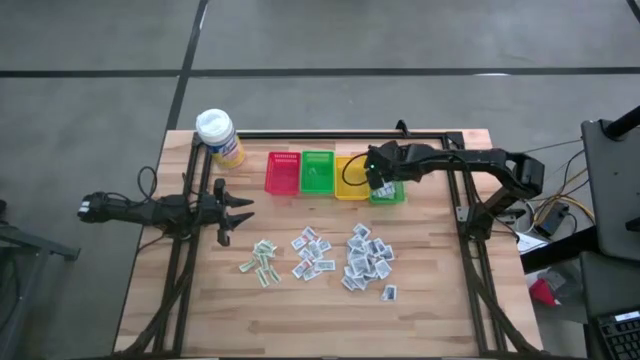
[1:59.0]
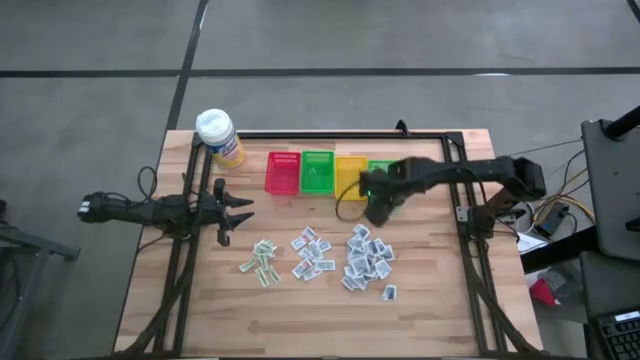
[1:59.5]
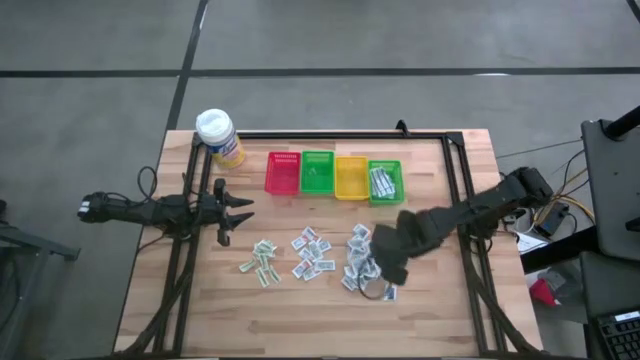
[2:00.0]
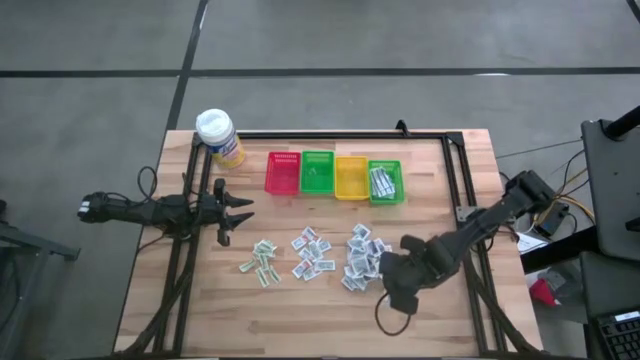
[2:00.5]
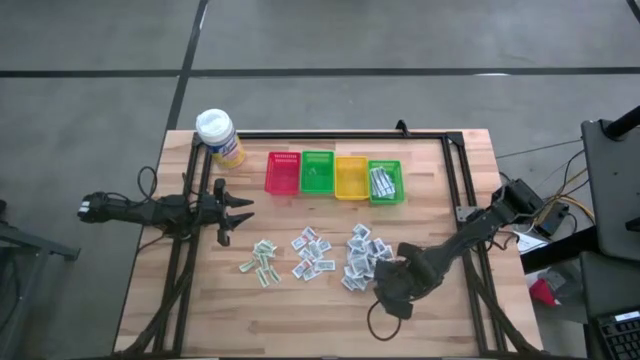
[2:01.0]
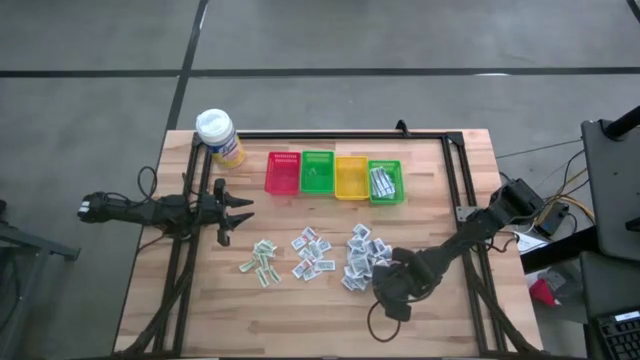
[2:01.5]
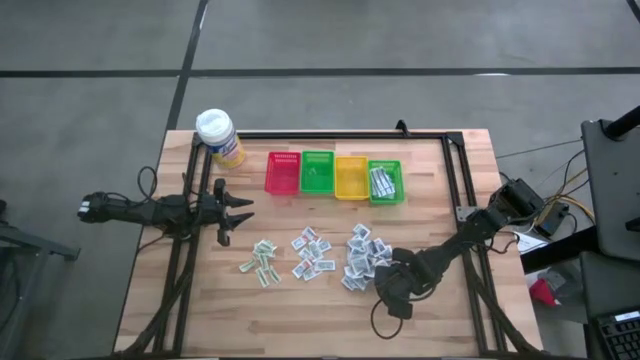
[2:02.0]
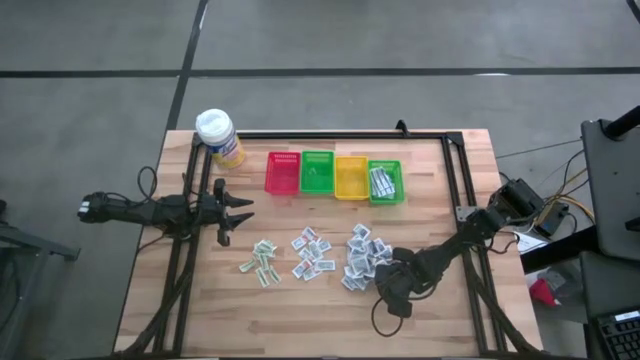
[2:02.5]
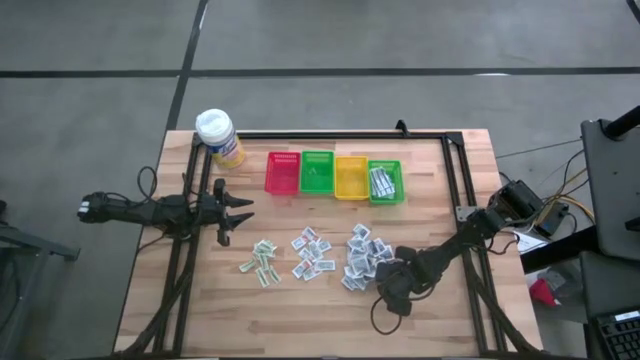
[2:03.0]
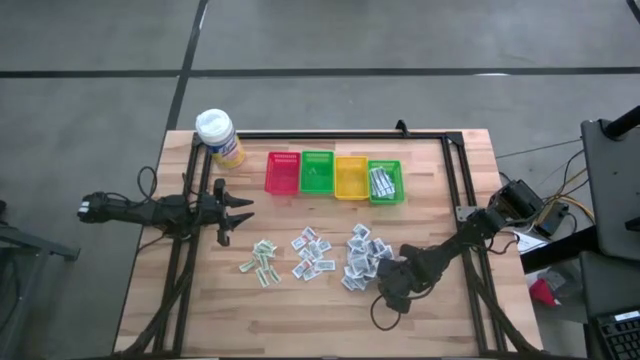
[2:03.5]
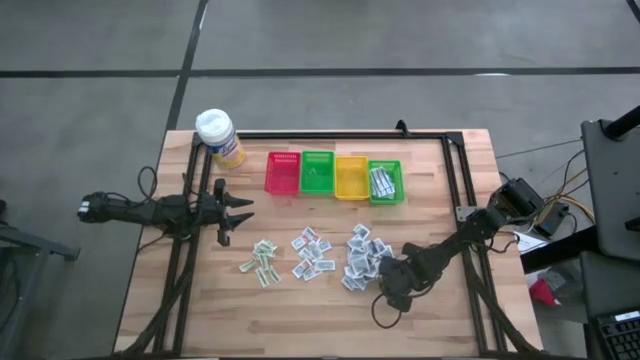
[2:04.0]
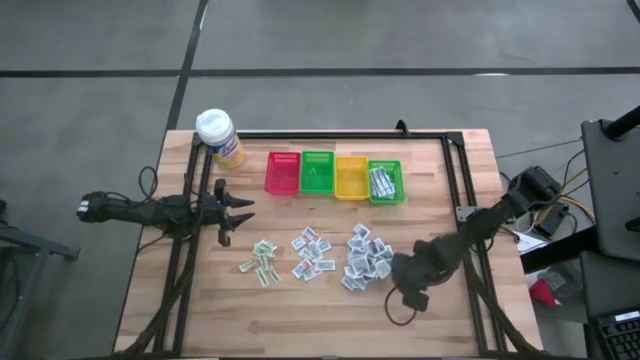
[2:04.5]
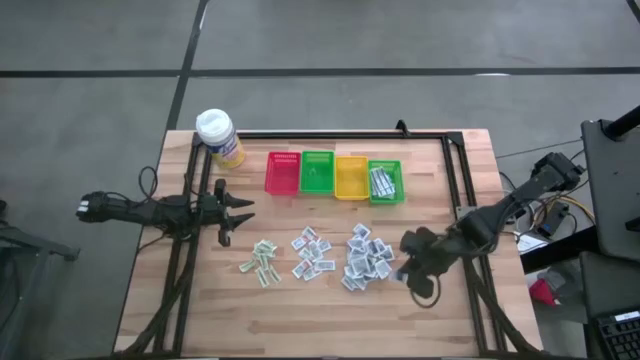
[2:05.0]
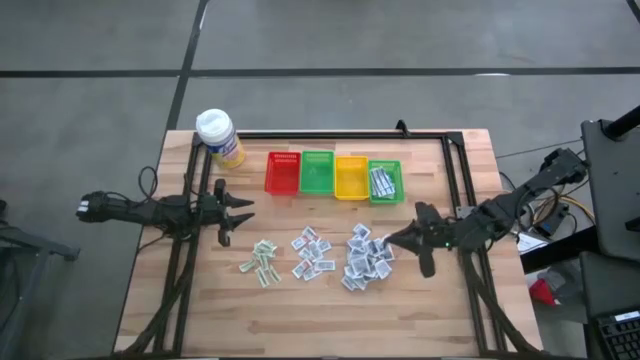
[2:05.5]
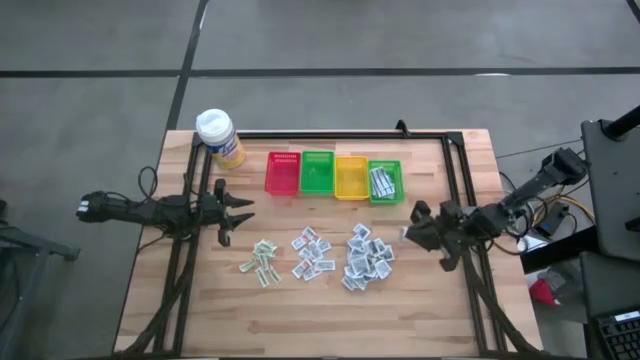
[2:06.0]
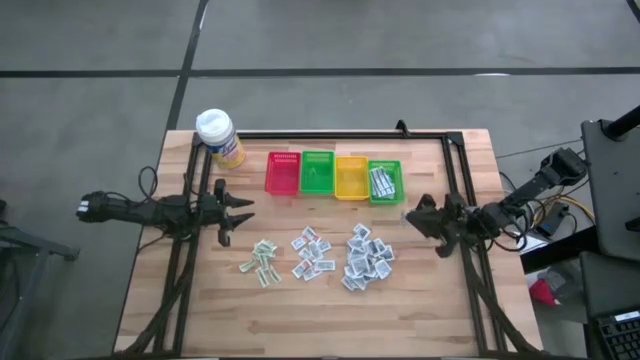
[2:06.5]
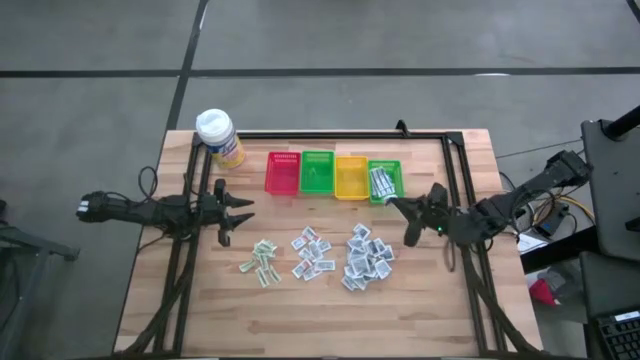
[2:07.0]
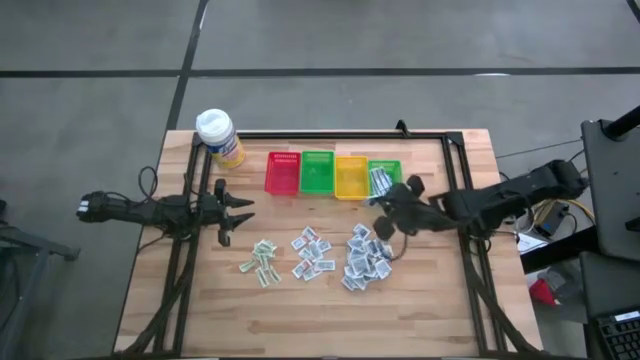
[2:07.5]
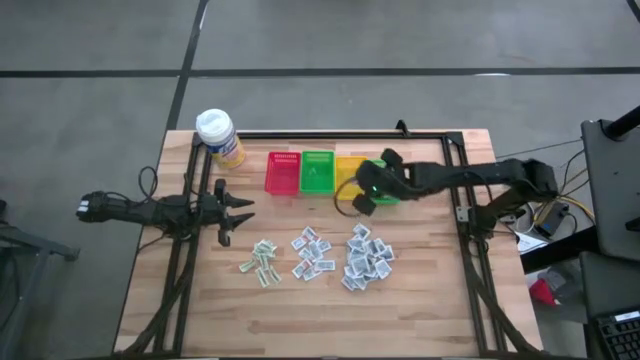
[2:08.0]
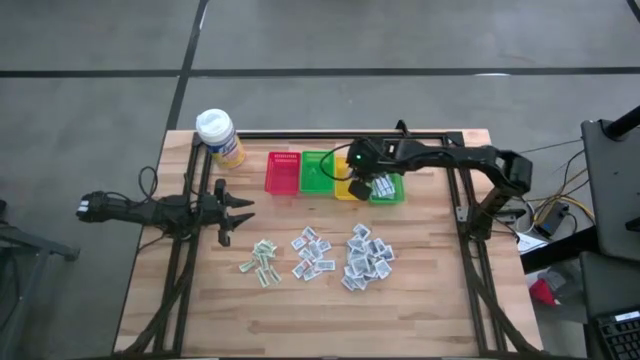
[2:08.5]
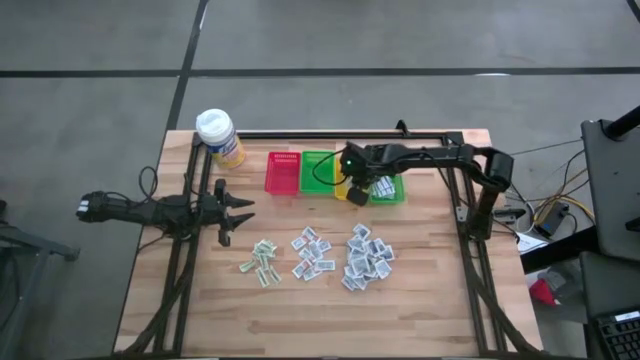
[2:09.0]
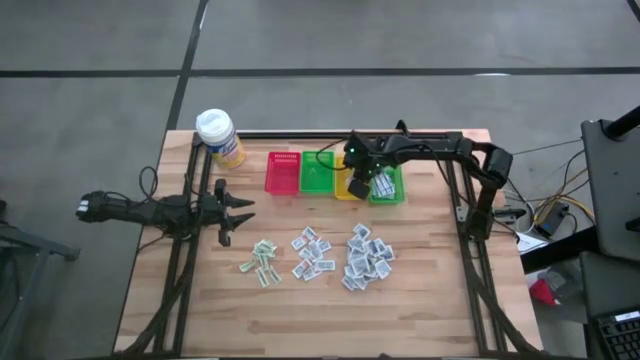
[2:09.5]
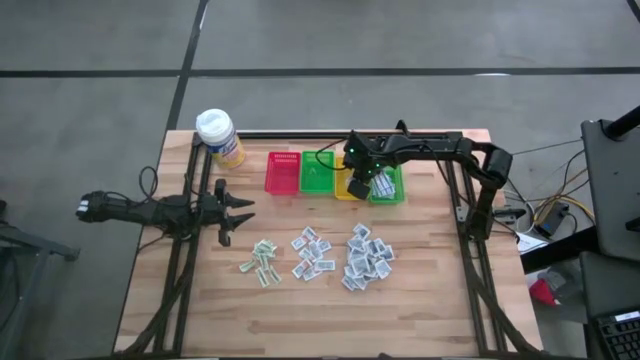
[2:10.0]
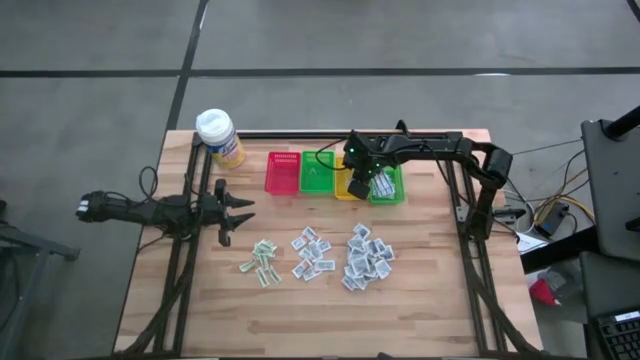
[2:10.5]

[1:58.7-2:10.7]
Task: Pick & Place First Aid Supplies
Put the blue alcohol pad into the yellow bin

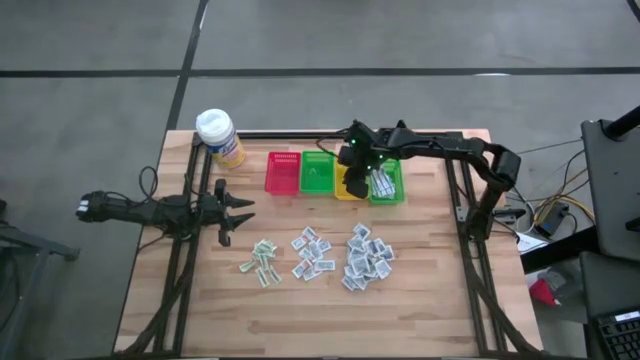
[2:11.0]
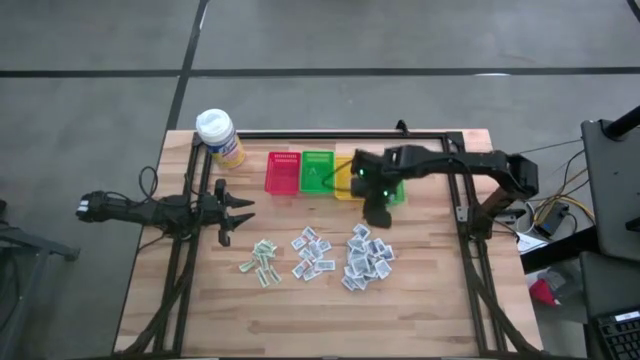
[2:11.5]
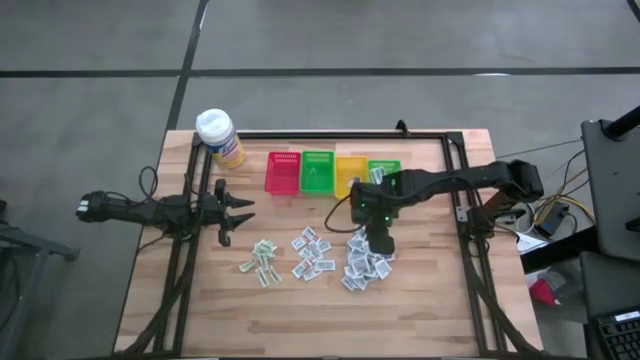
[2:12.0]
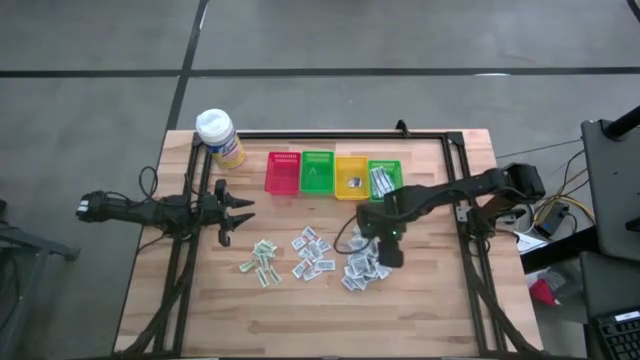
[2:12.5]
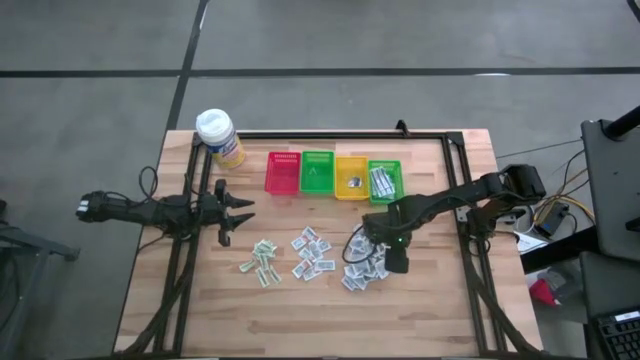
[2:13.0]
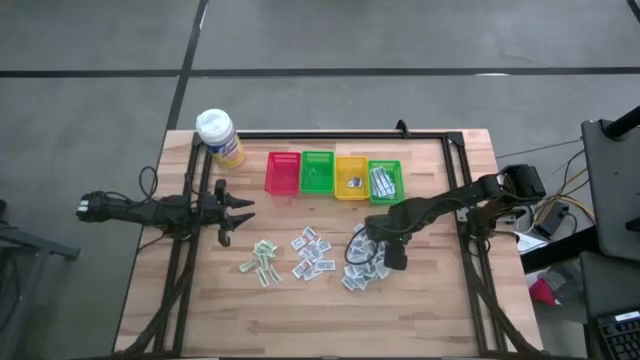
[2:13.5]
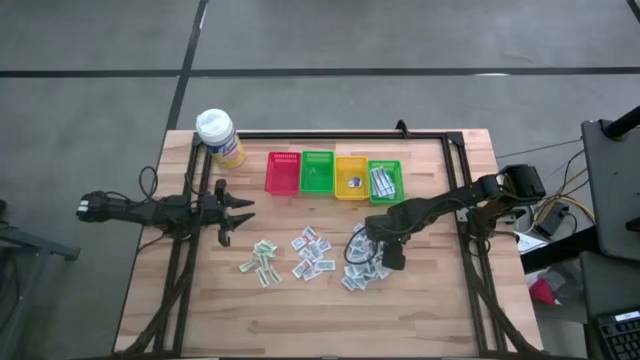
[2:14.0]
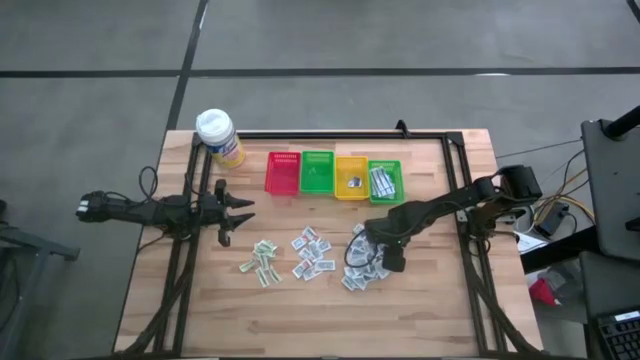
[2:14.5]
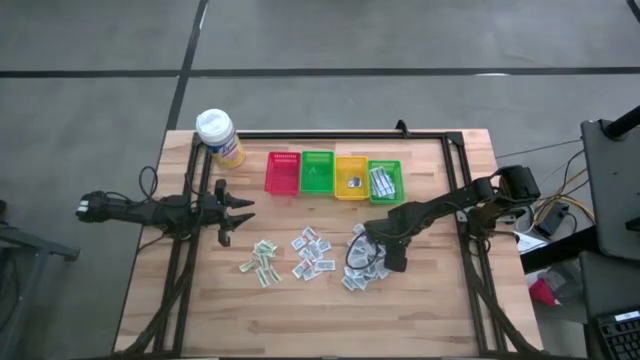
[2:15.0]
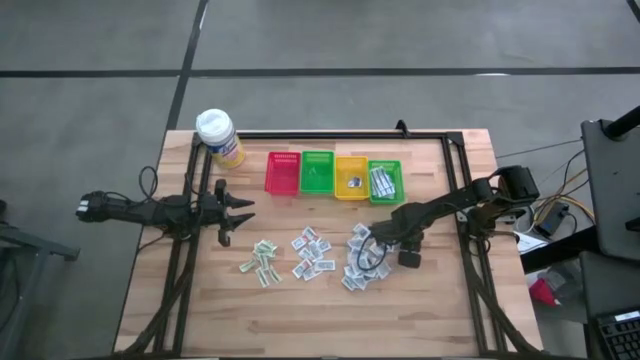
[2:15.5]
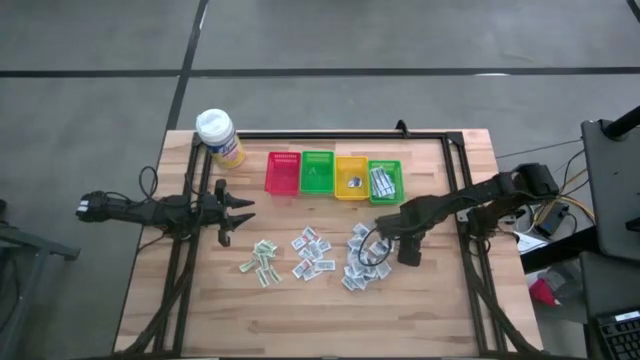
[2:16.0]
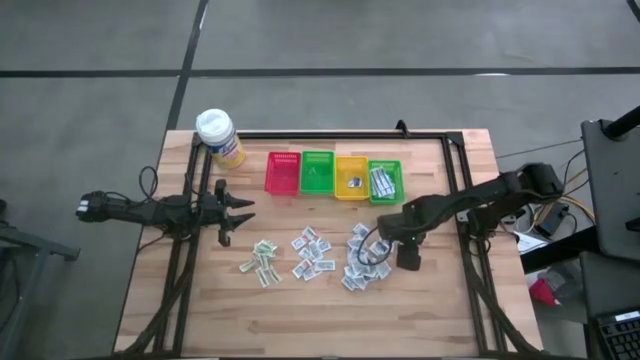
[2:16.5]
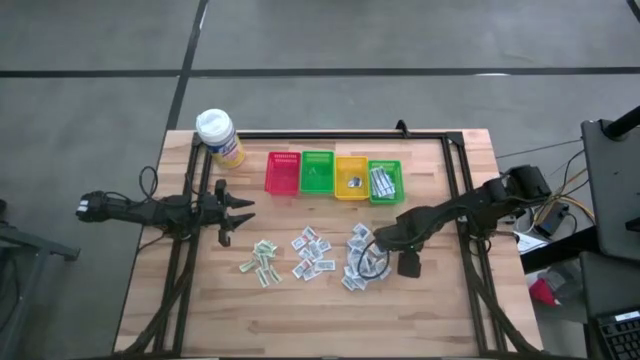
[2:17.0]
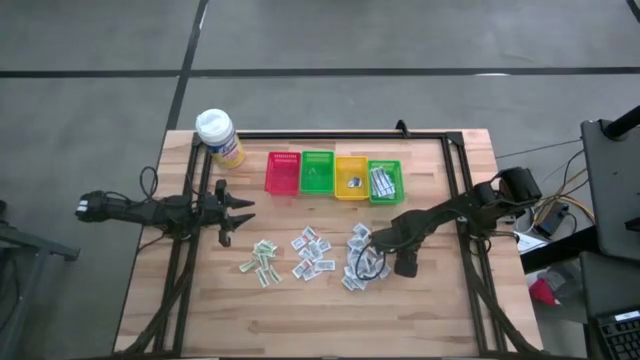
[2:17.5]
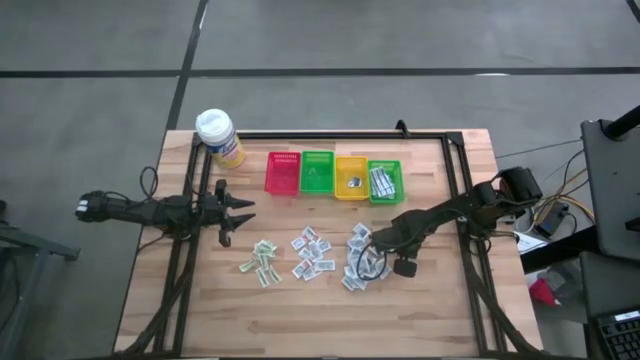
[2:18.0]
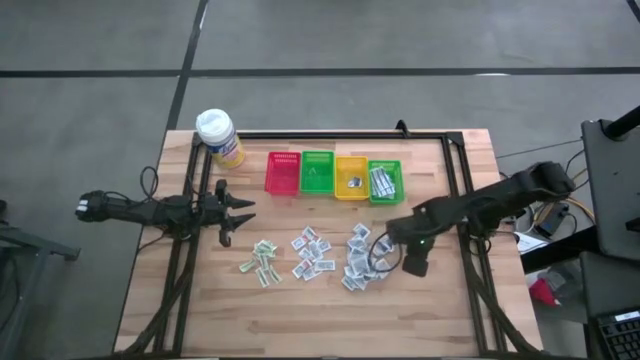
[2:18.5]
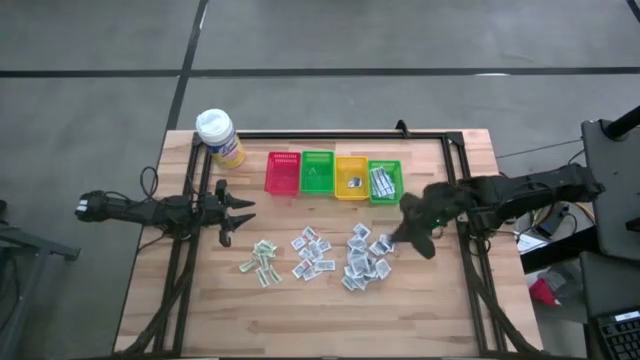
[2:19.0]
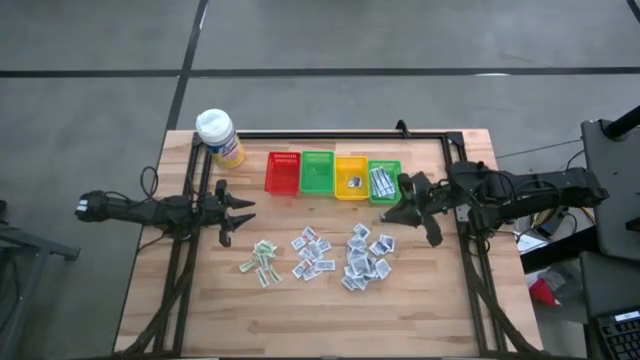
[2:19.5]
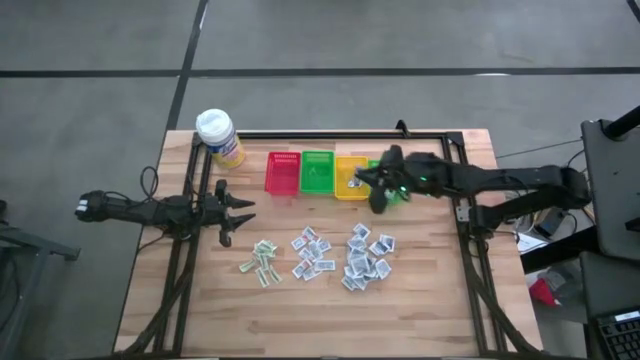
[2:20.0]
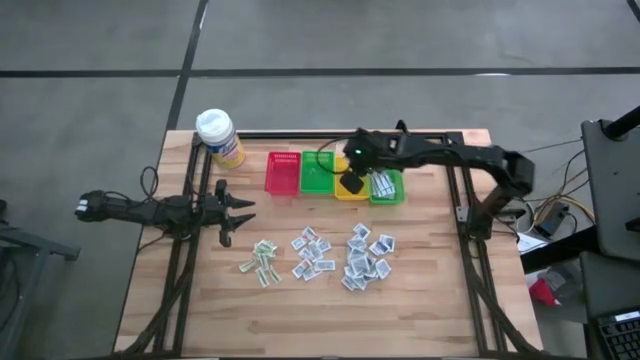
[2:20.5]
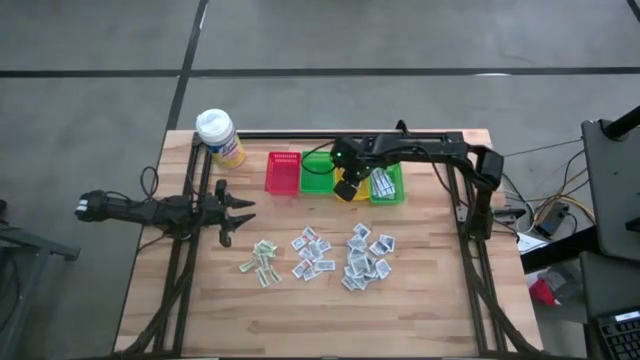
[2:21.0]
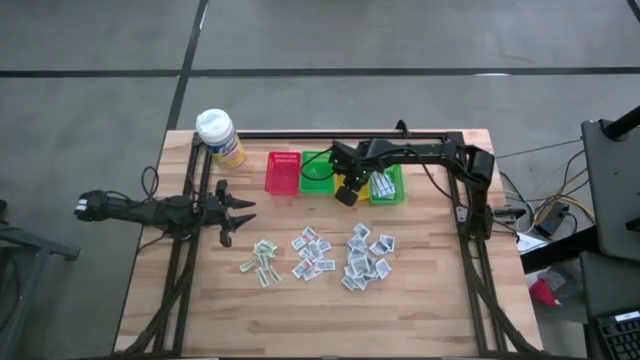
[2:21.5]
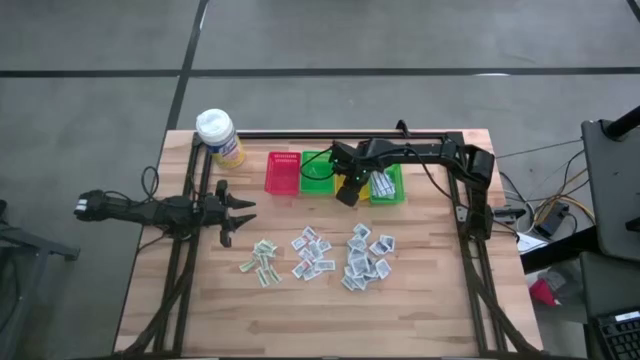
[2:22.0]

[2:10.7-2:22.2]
Put the blue alcohol pad into the yellow bin
